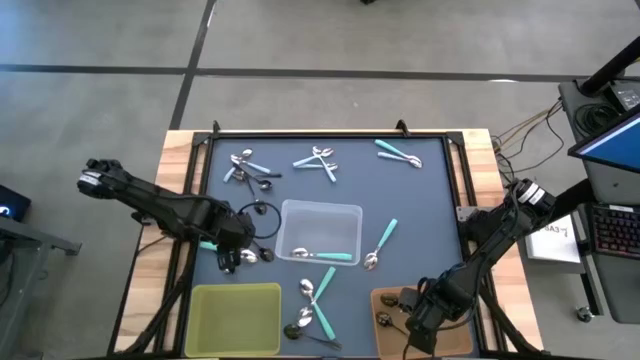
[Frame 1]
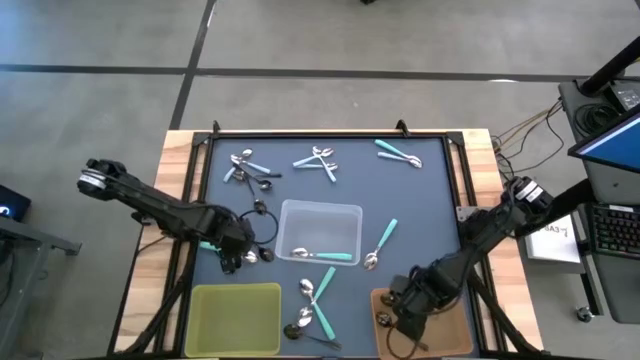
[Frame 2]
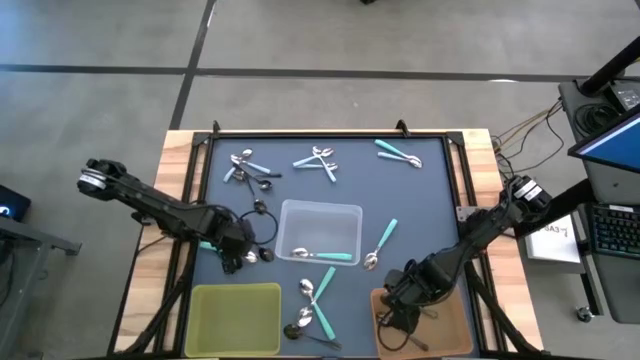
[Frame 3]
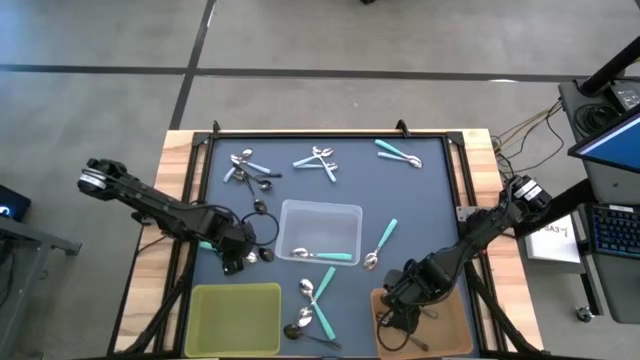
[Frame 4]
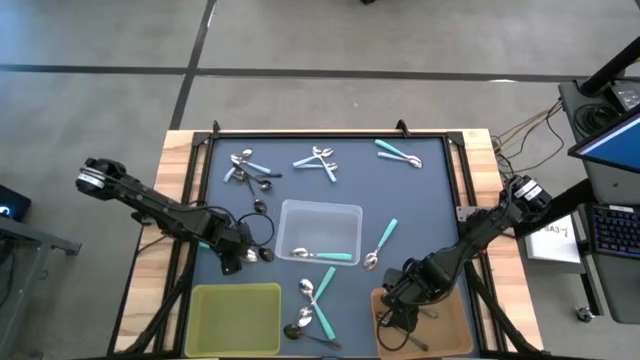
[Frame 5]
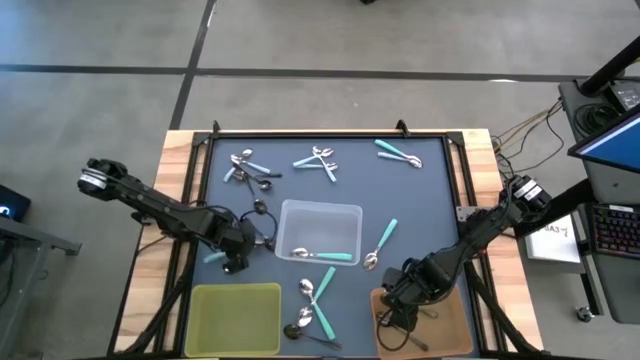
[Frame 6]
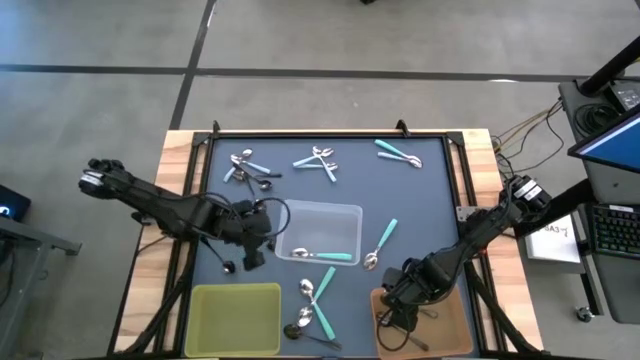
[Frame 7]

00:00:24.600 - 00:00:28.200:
Task: Sort silverware by color (type)
Put the green spoon into the transparent bin

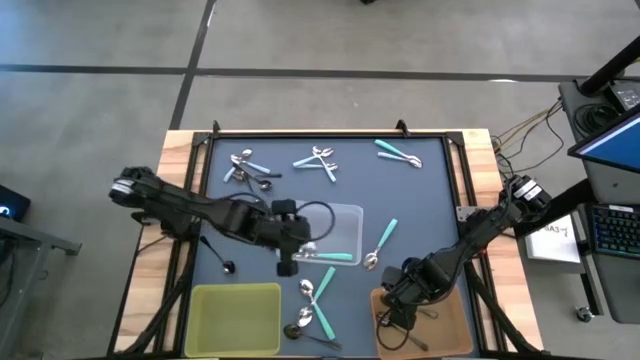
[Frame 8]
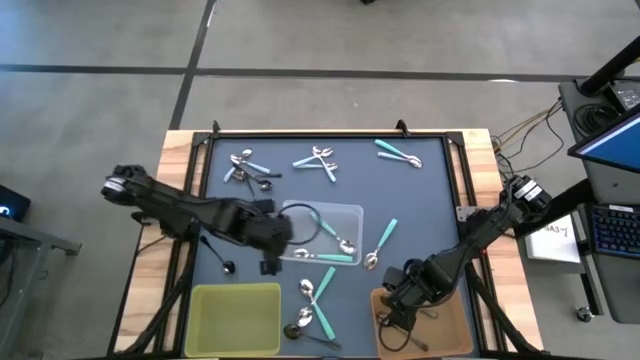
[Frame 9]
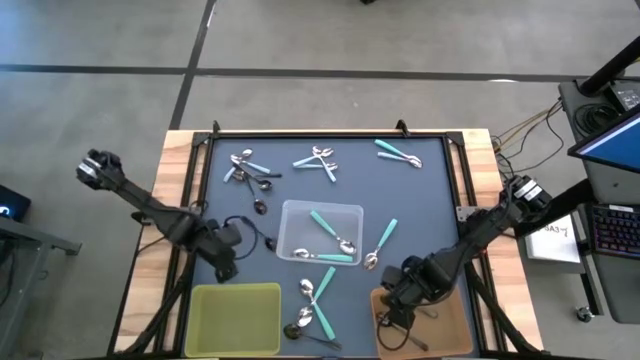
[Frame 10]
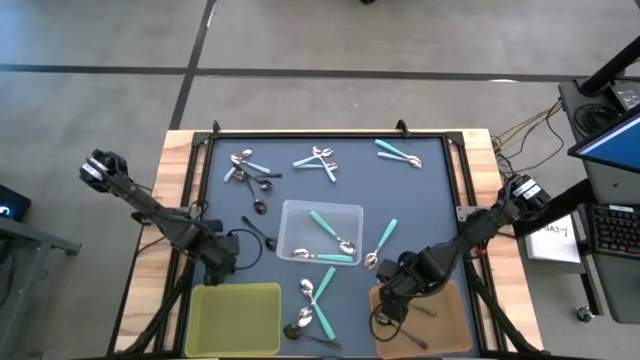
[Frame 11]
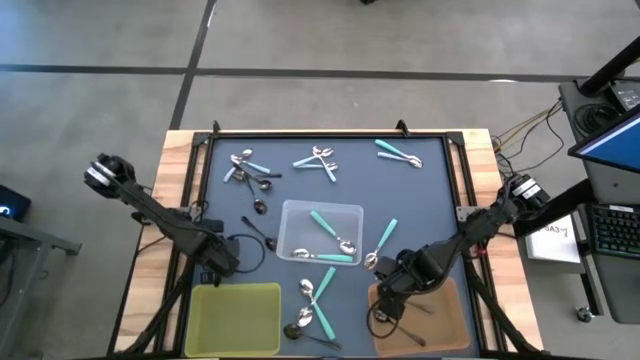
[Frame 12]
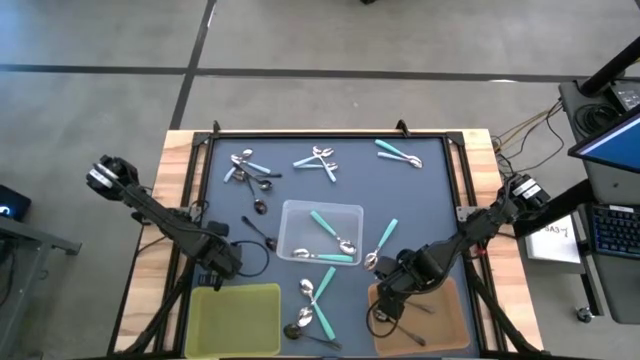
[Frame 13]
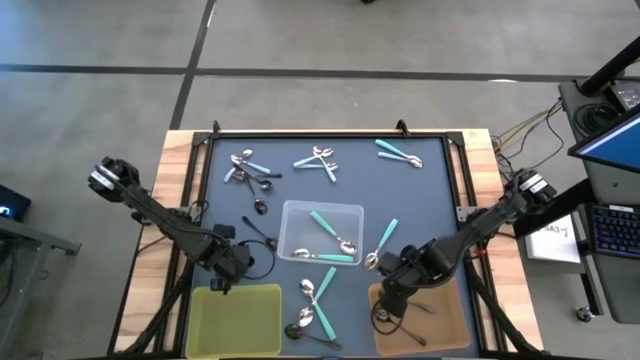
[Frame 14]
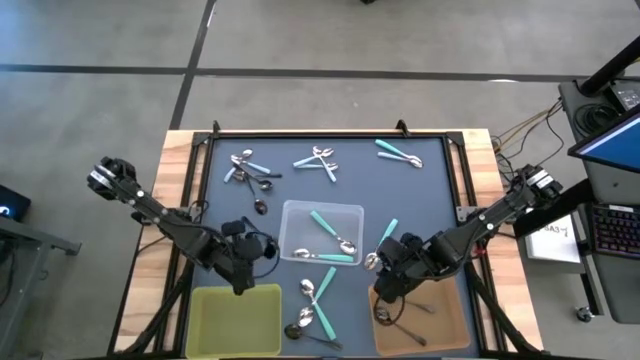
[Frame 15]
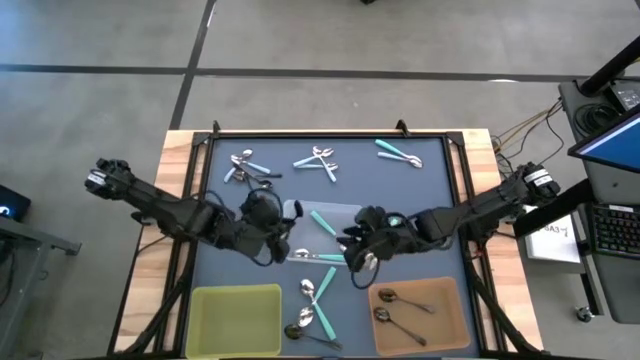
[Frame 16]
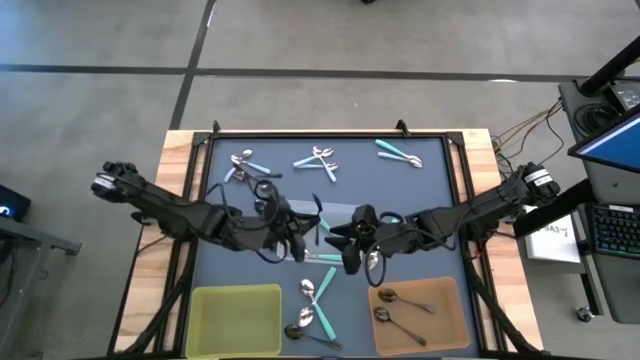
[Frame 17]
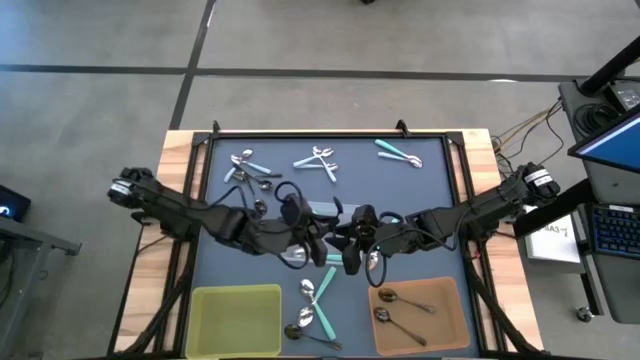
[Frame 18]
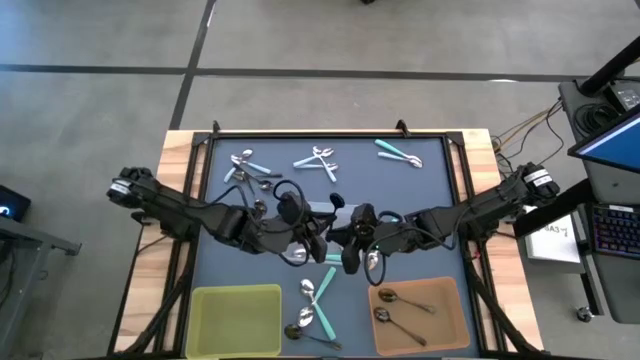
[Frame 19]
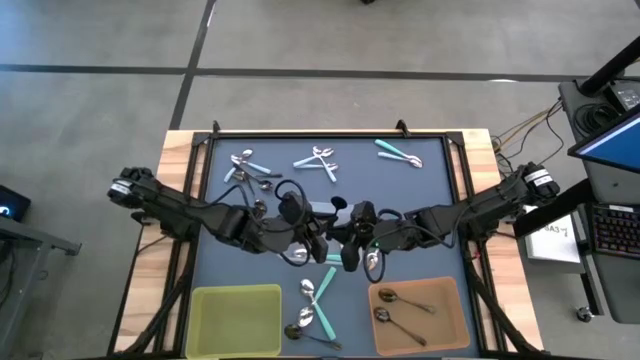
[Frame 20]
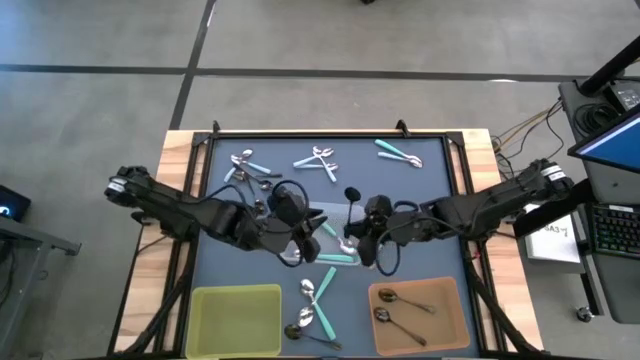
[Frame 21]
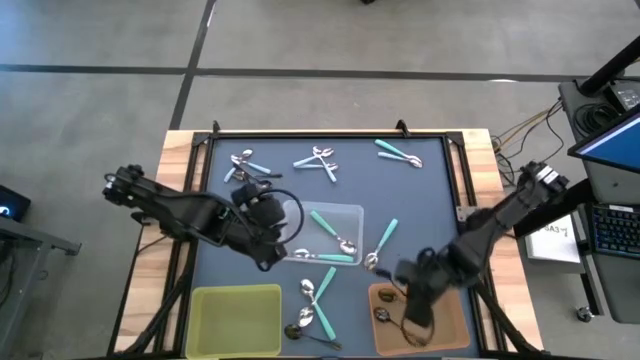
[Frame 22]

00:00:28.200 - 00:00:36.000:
Put the black spoon into the orange bin

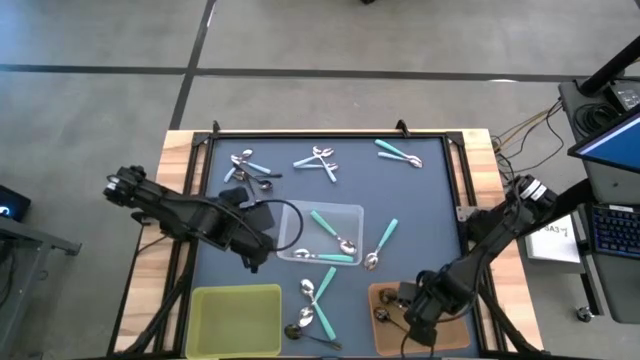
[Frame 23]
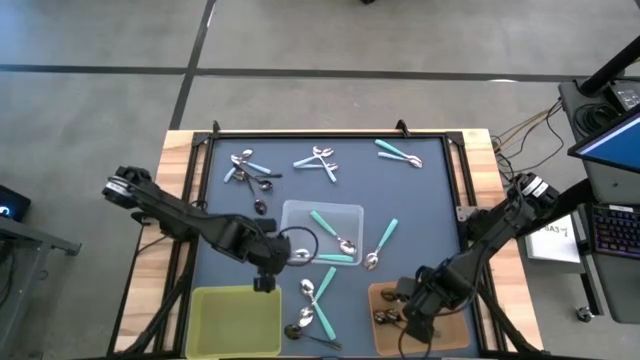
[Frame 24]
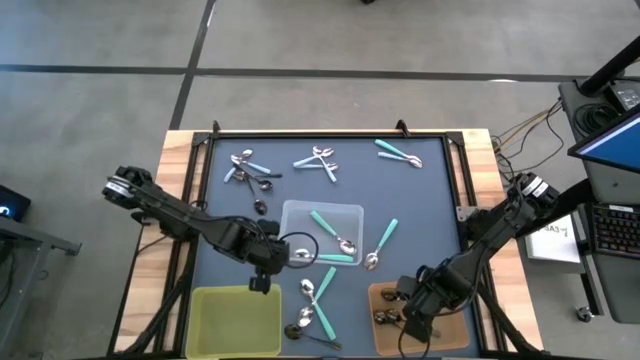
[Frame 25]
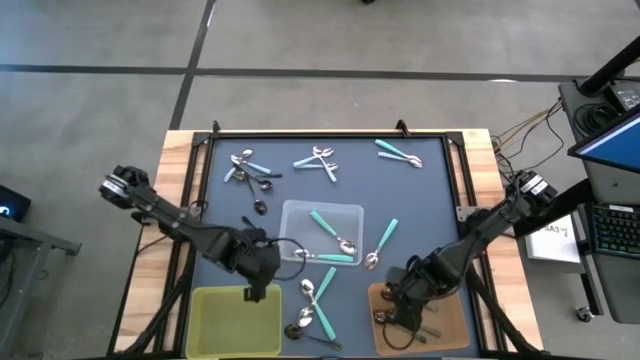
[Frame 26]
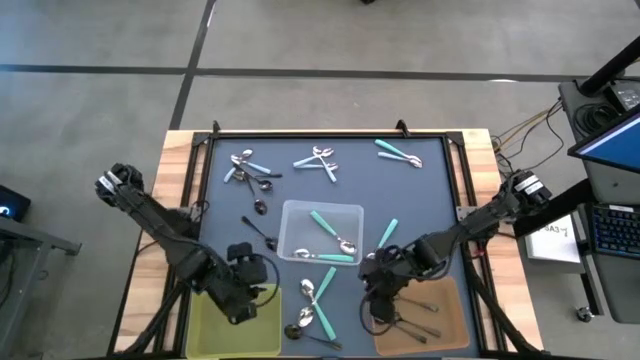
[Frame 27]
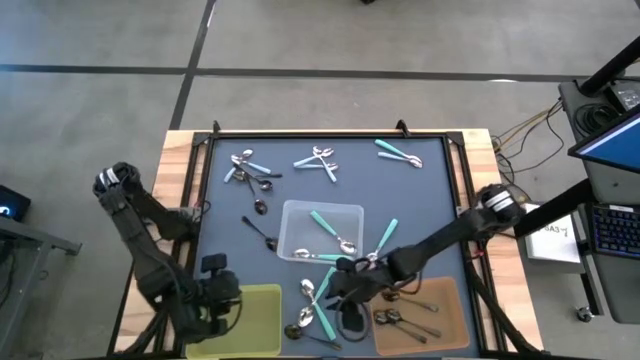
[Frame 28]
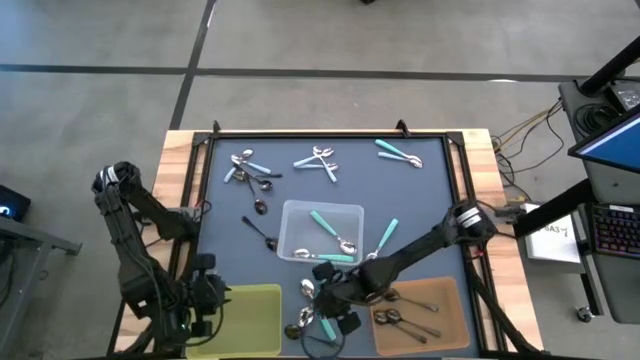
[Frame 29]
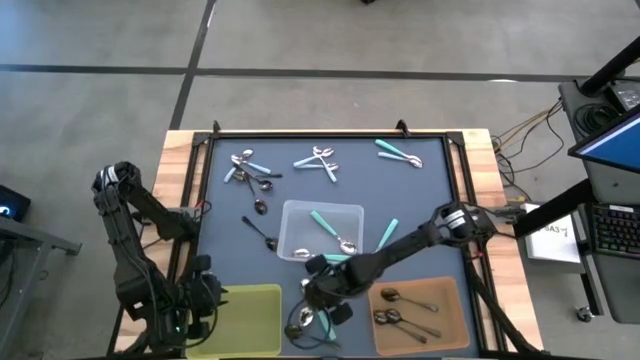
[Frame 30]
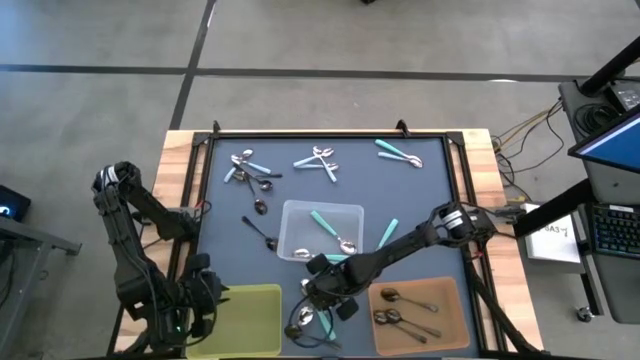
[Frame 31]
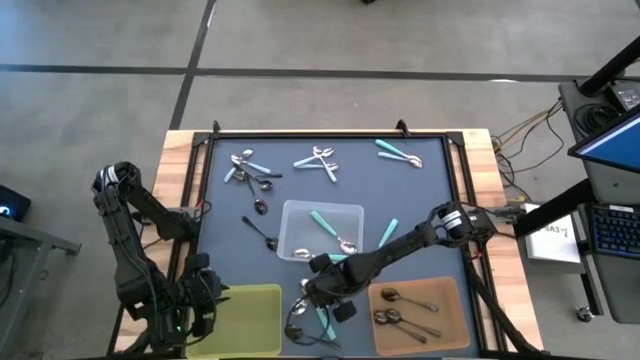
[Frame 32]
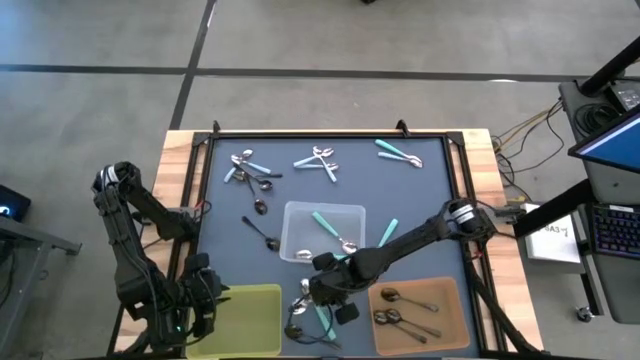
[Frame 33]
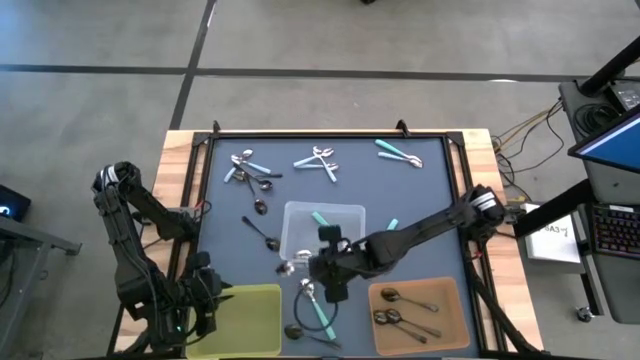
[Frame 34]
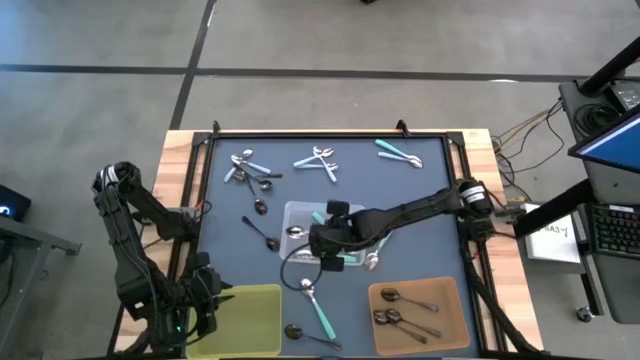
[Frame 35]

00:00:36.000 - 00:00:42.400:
Put the green spoon into the transparent bin

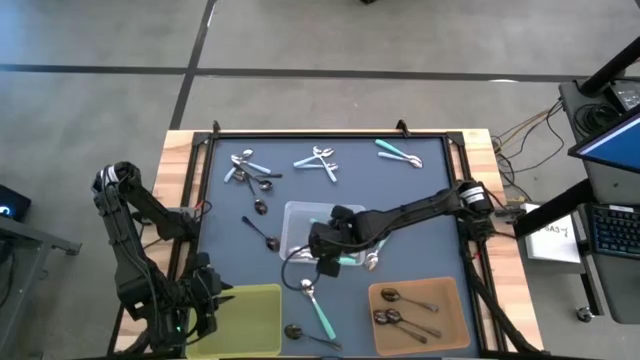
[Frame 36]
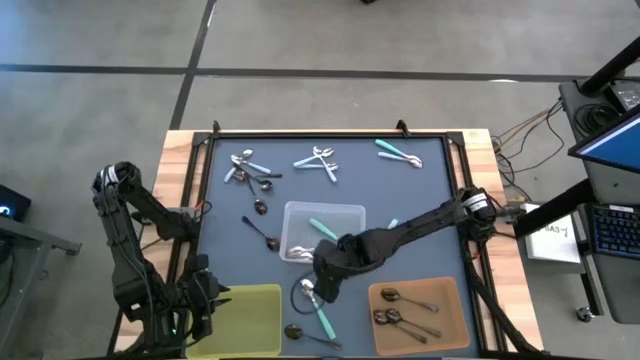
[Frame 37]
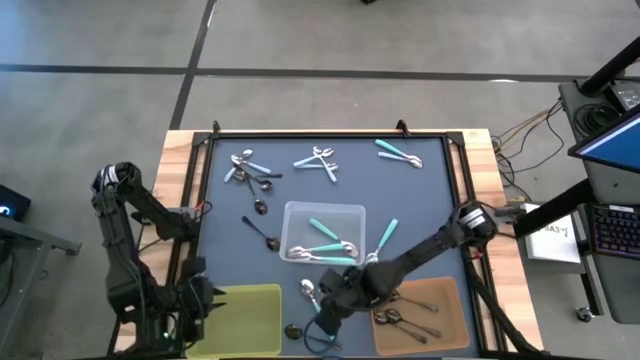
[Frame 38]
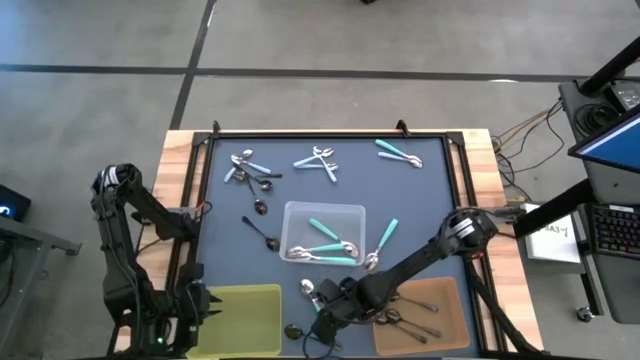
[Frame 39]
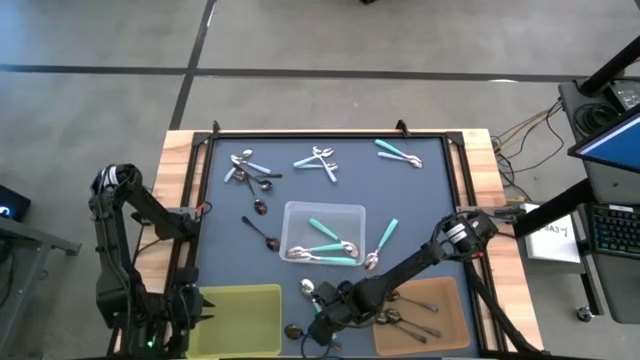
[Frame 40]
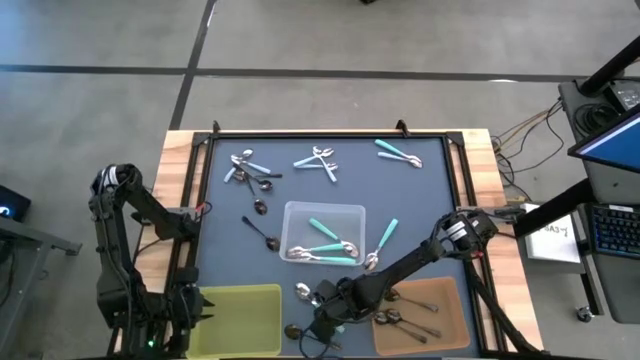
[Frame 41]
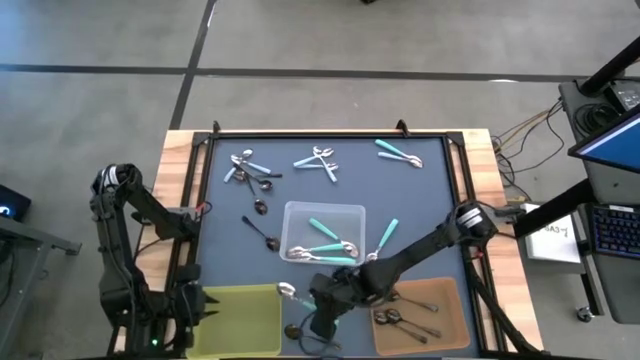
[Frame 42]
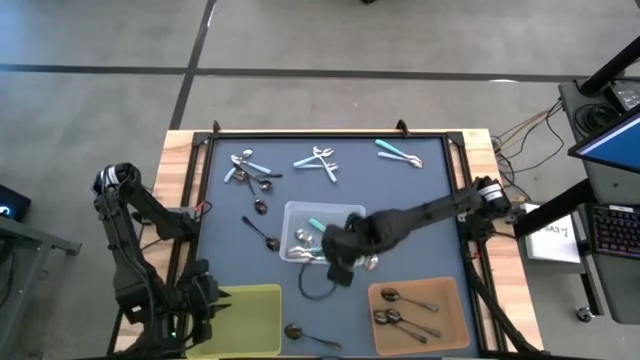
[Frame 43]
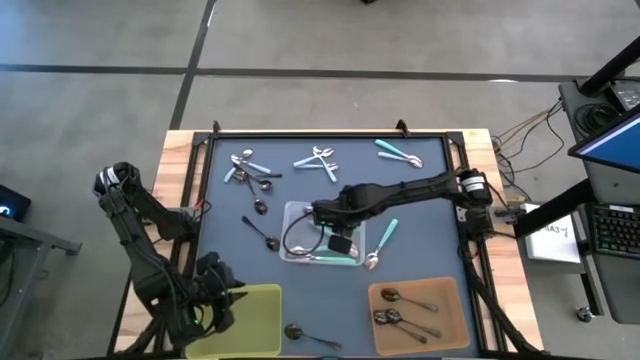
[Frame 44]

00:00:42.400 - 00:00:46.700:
Put the green spoon into the transparent bin
